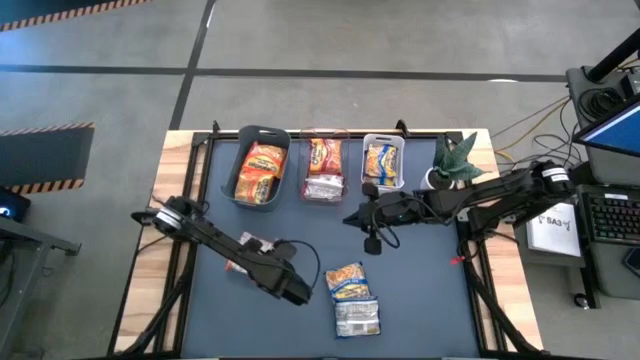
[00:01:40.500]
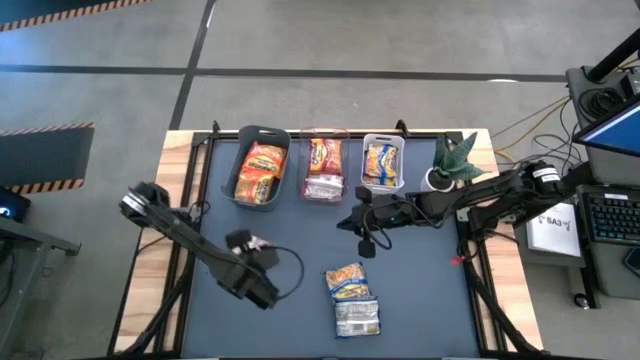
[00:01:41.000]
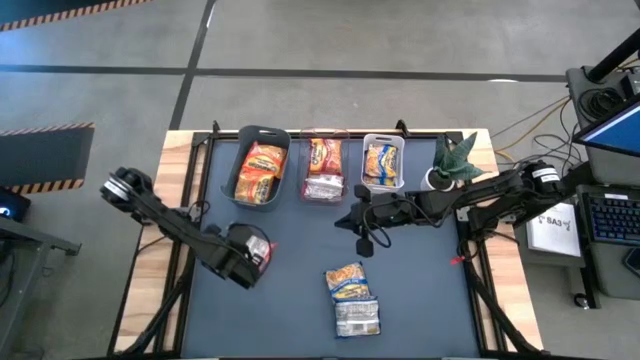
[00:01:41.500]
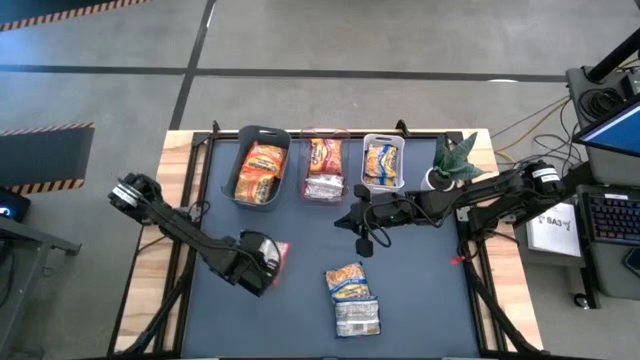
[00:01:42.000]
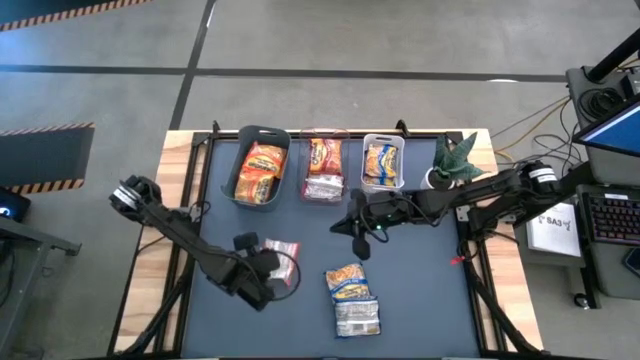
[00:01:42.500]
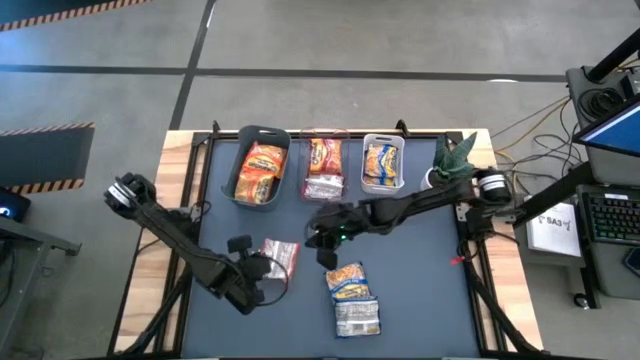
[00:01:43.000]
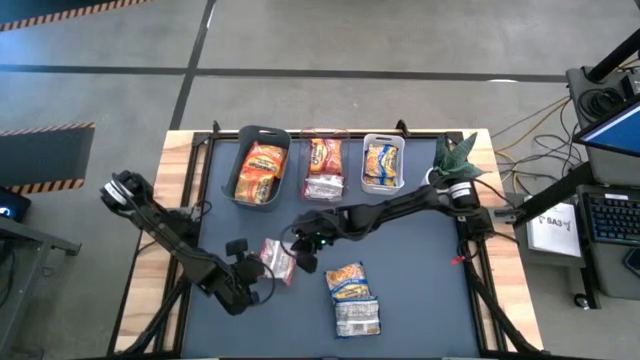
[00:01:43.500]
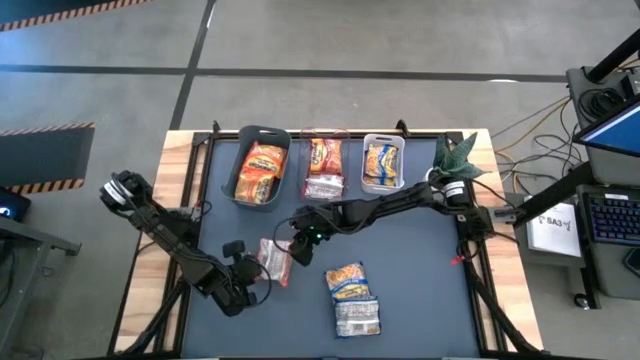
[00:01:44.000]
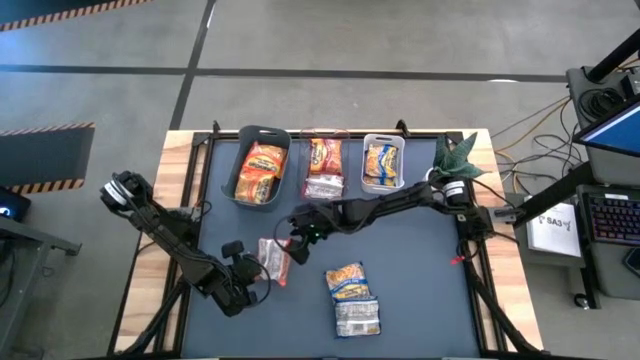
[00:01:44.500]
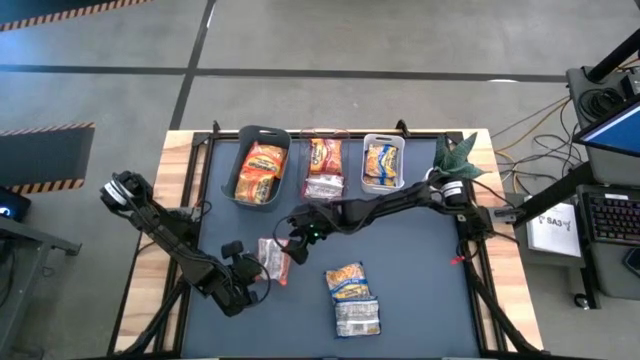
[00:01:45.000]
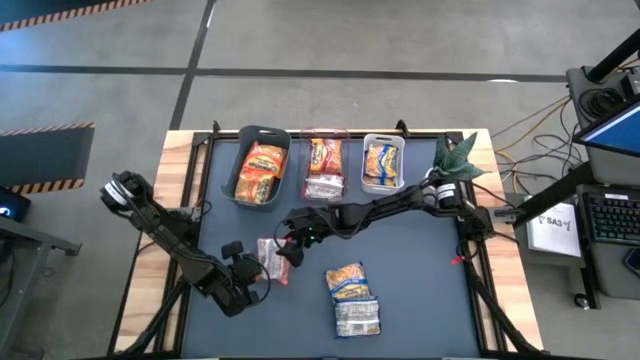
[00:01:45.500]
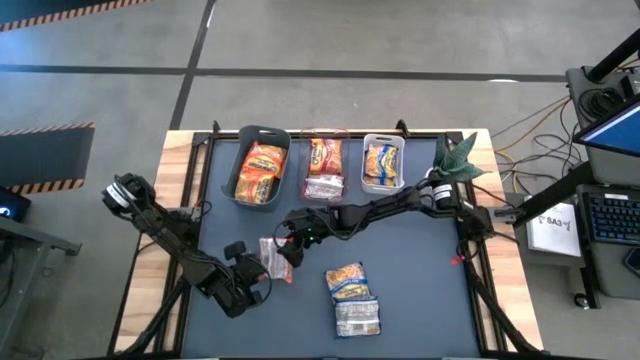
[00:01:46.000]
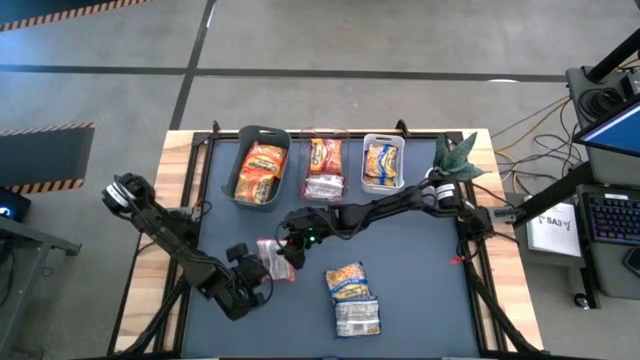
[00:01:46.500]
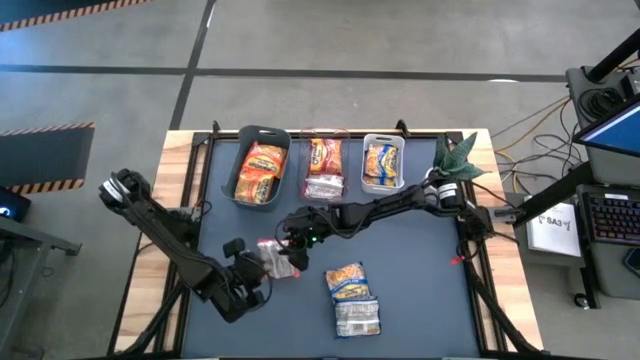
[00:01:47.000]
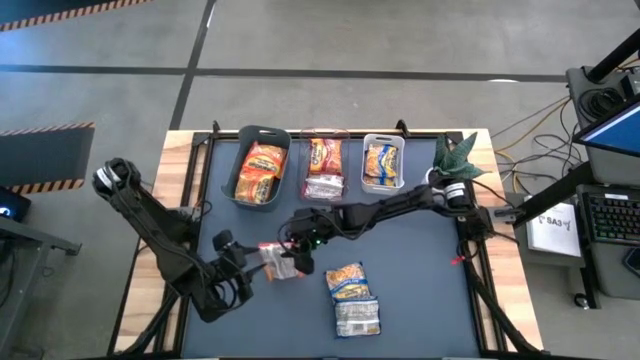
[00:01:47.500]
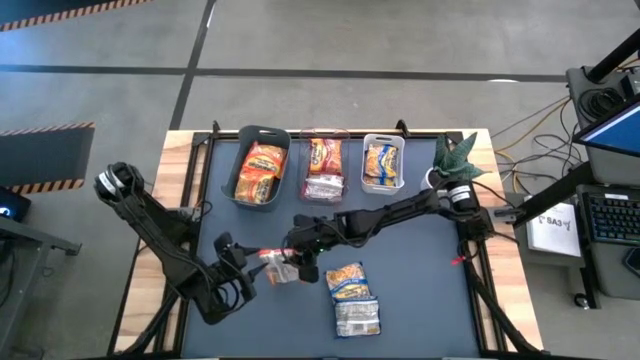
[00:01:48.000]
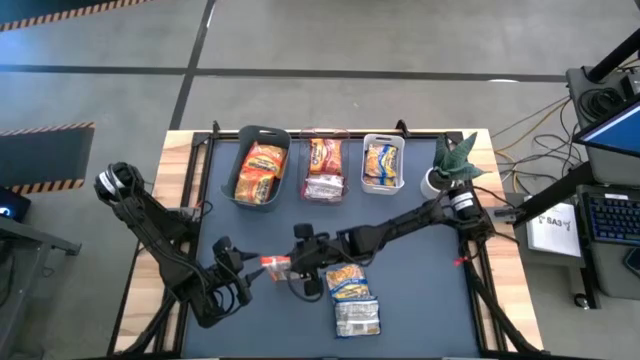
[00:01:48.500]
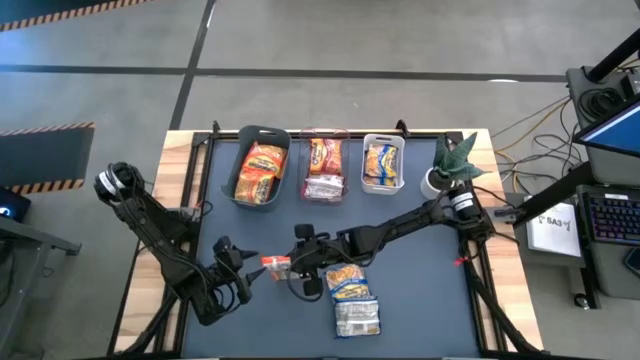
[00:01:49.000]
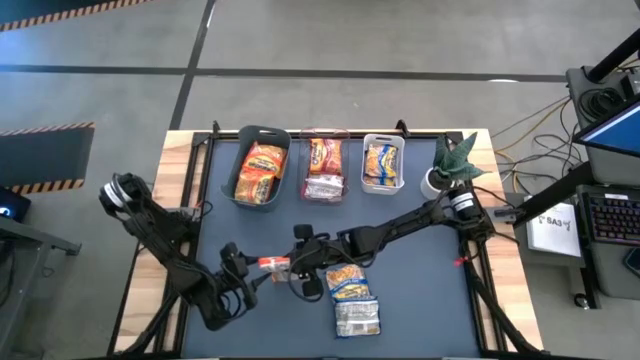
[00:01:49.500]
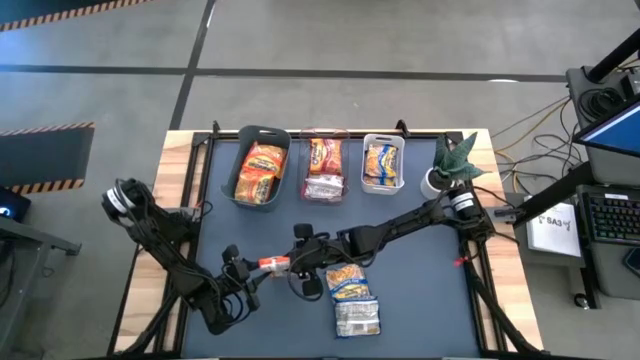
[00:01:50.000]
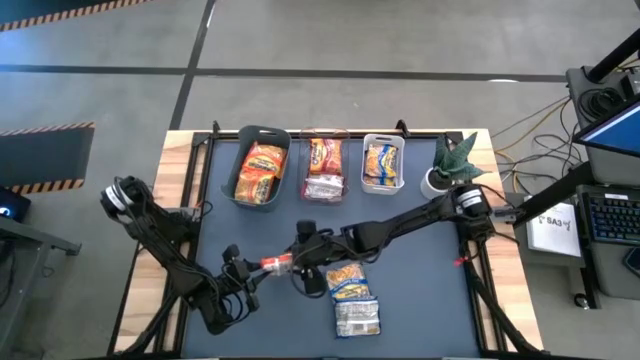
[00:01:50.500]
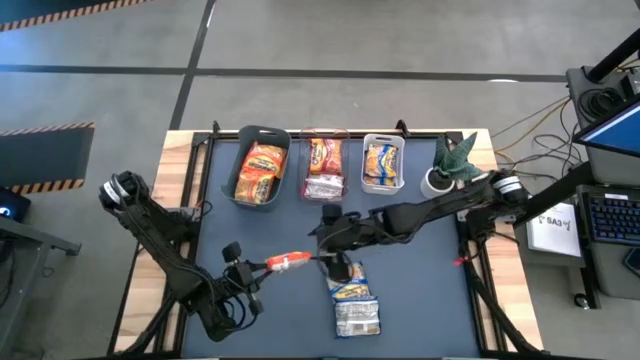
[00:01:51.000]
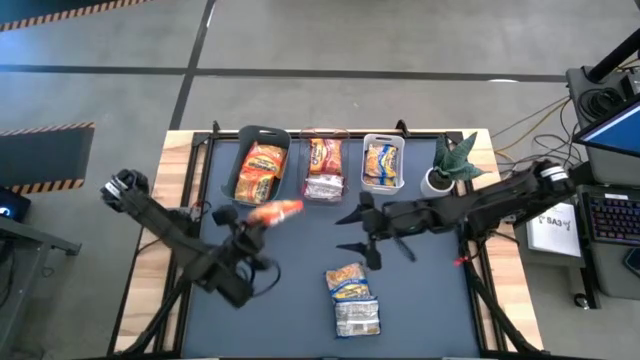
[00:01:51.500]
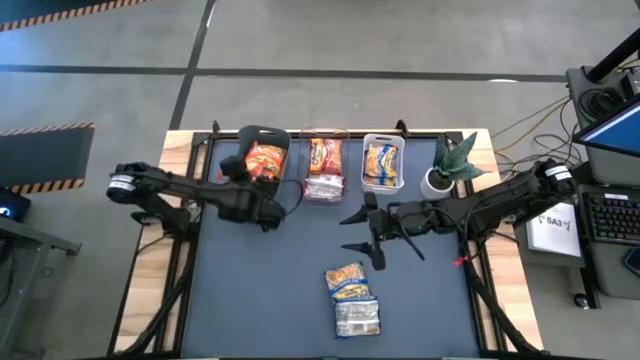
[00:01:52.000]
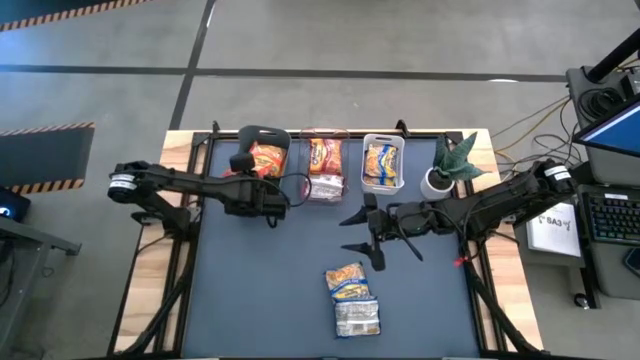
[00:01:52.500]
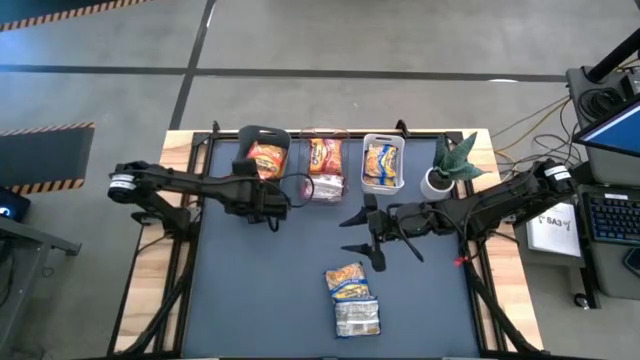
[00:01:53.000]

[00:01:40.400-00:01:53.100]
Task: Sort Maruchan noodles
Put the orange noodle pack into the dark green bin
